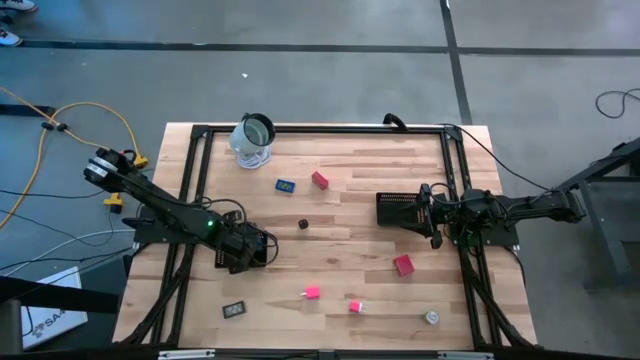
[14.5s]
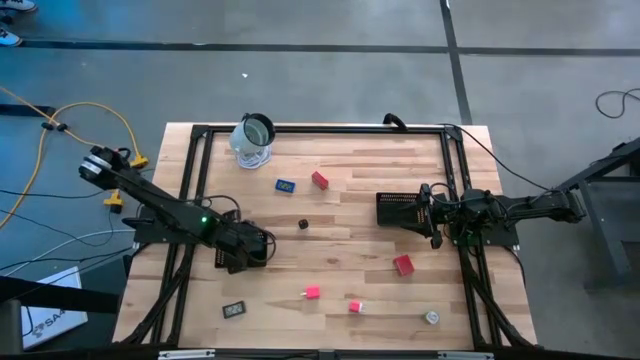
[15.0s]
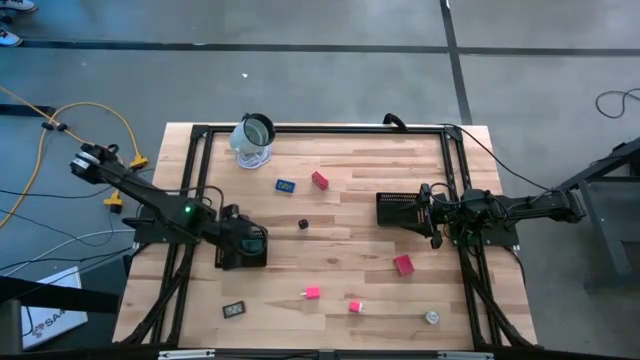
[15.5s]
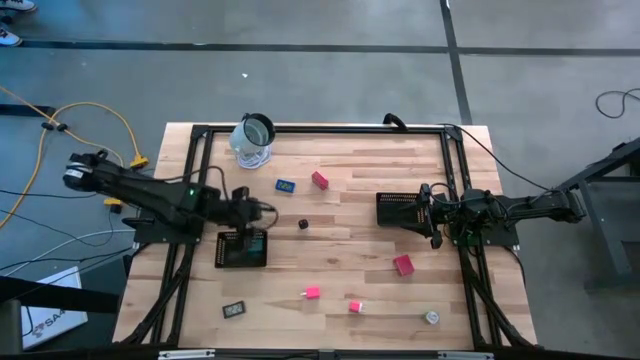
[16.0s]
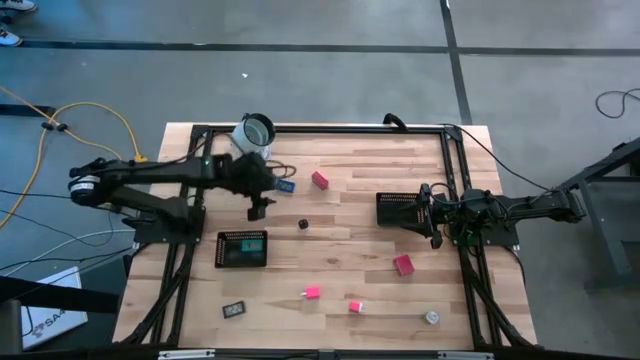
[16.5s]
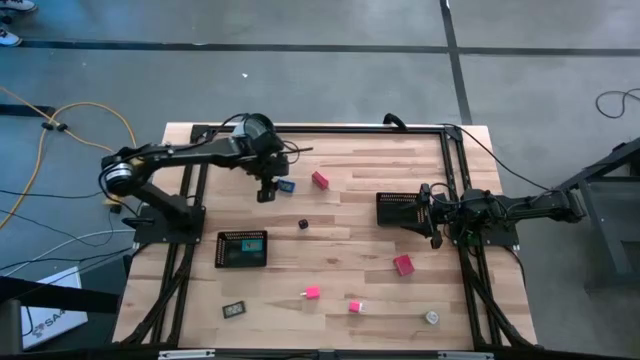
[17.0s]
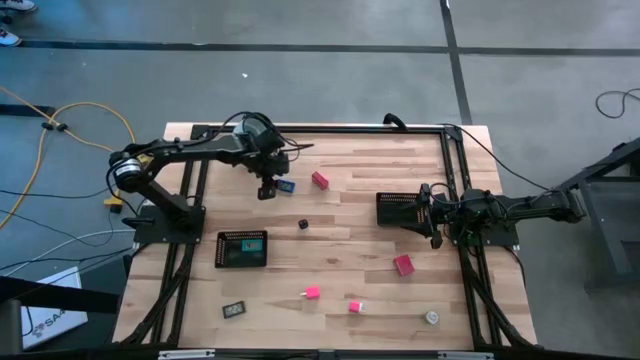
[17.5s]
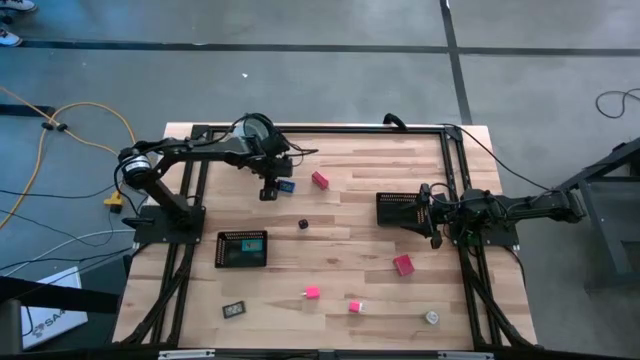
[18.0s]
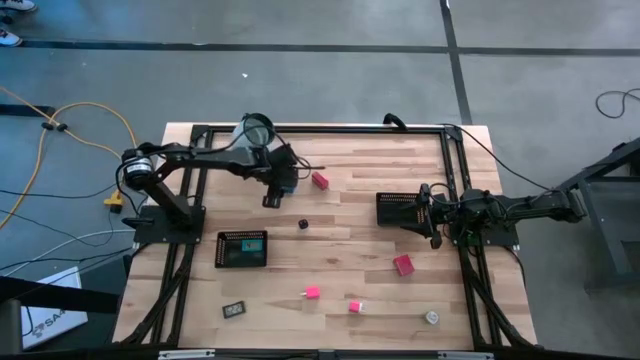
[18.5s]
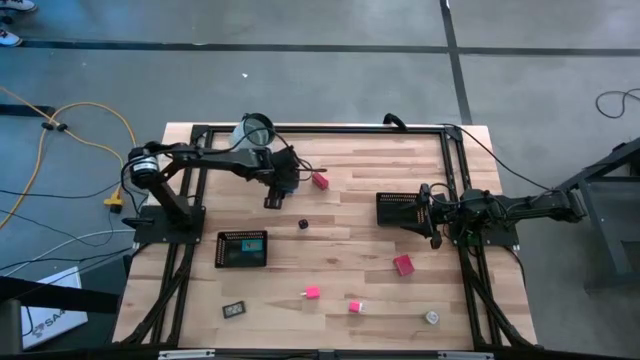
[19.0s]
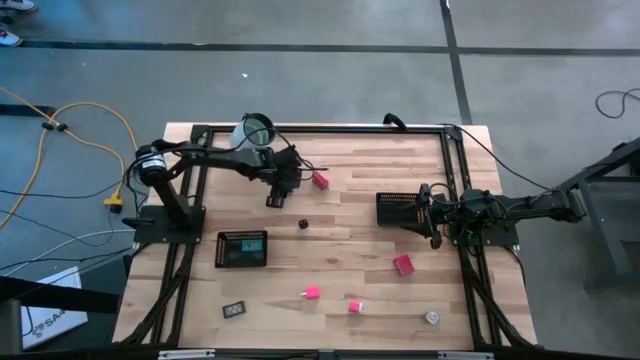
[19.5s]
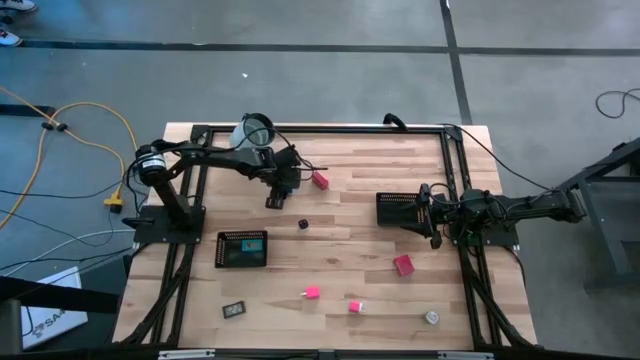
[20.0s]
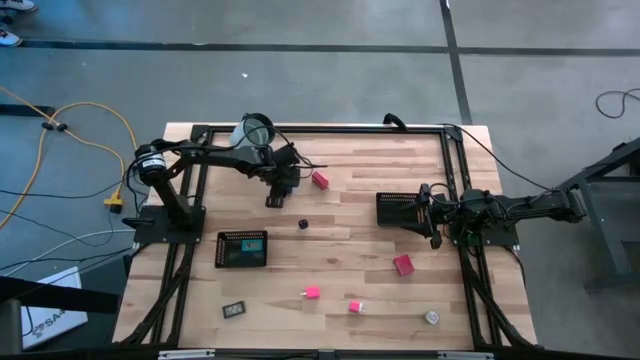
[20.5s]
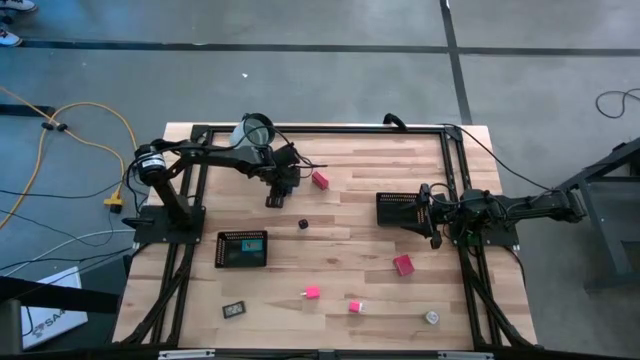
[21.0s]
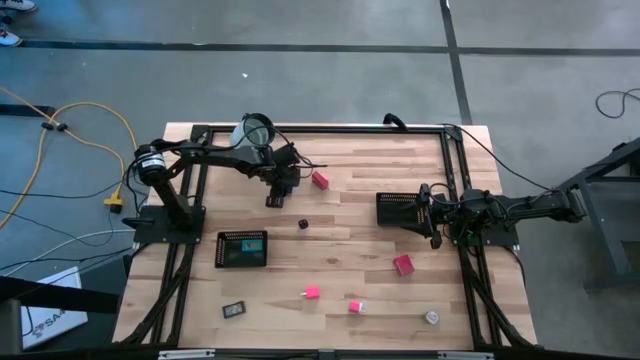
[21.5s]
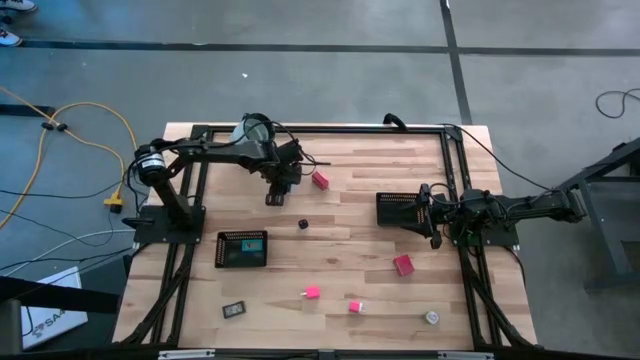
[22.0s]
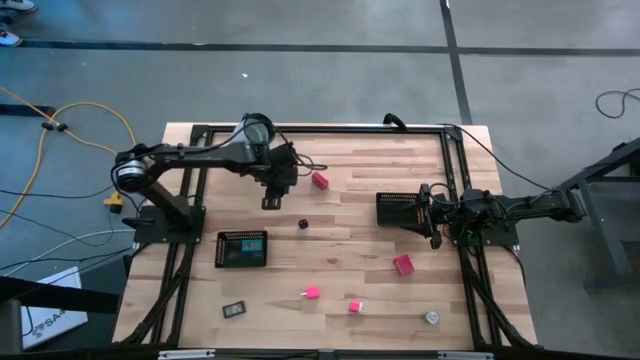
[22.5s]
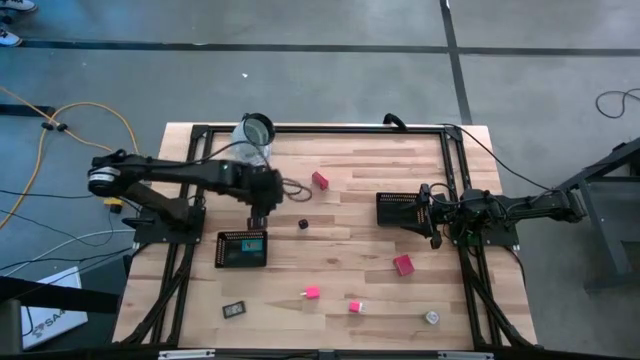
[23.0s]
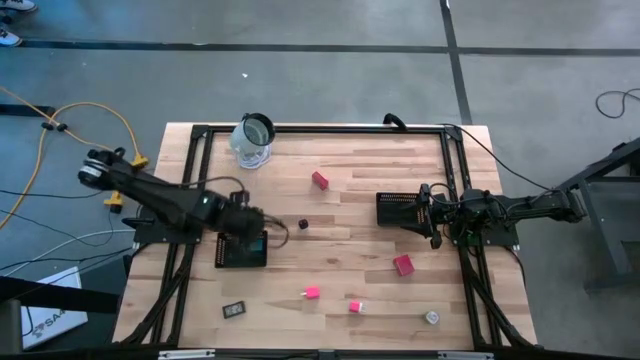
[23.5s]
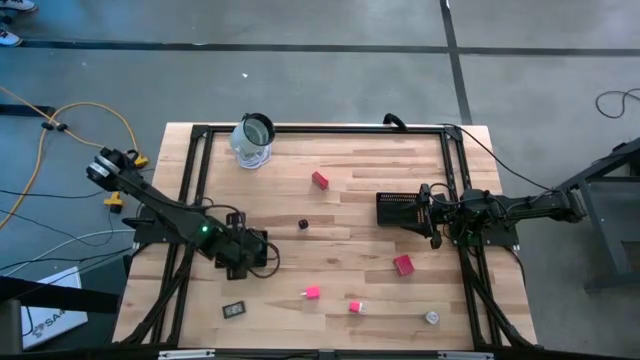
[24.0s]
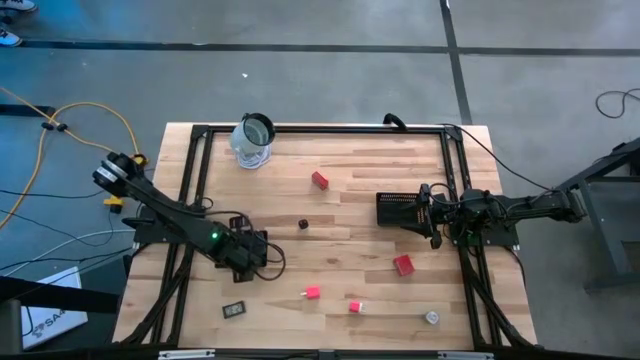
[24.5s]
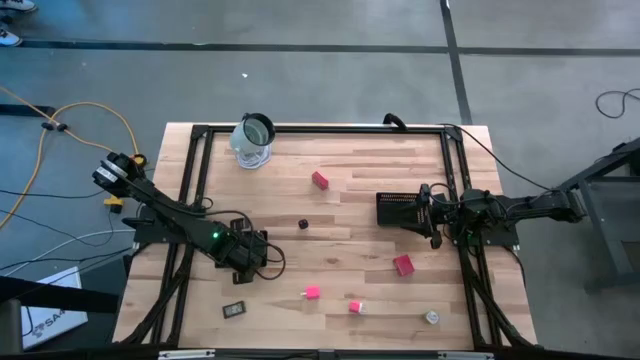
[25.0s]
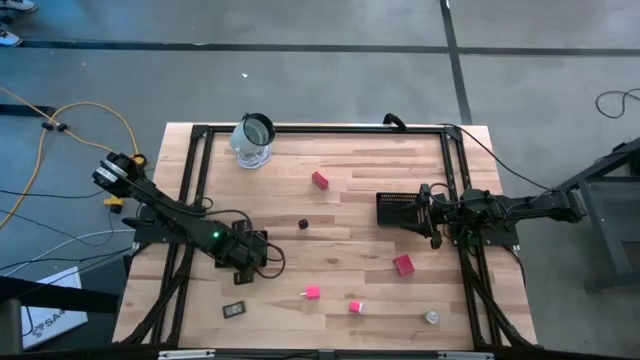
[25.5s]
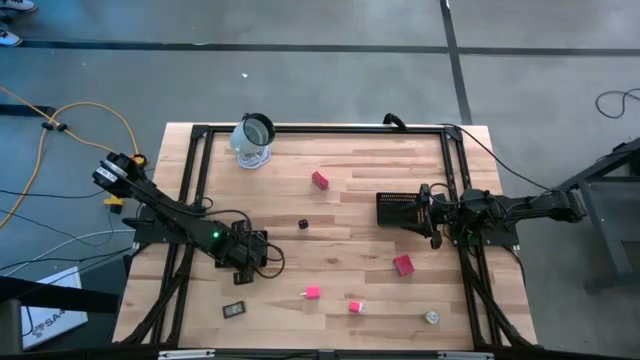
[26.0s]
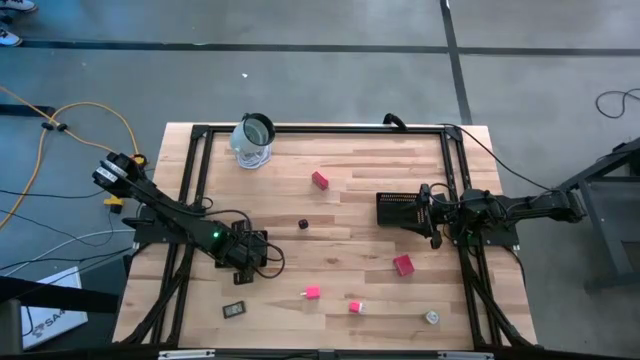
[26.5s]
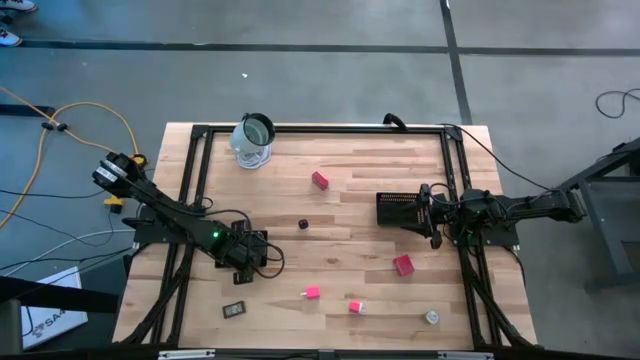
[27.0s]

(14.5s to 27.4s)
Task: Pick & Place Office items
Put the dark blue digital timer into the left black bin

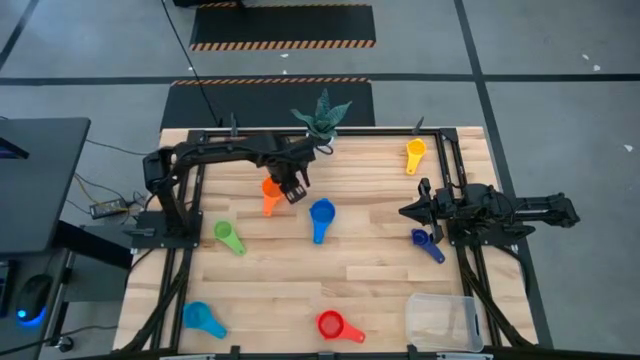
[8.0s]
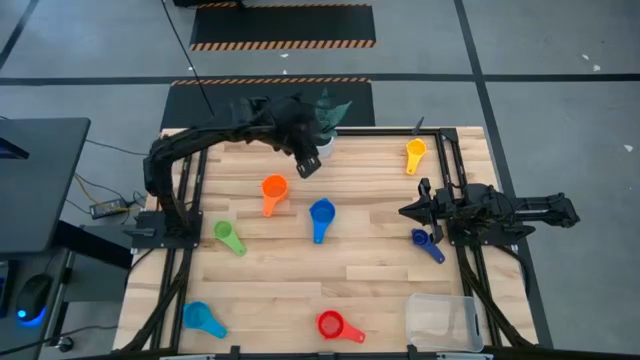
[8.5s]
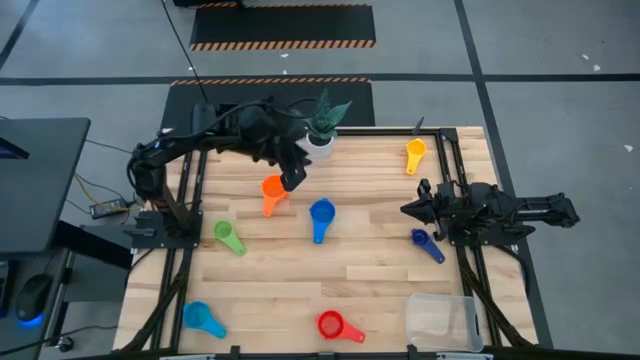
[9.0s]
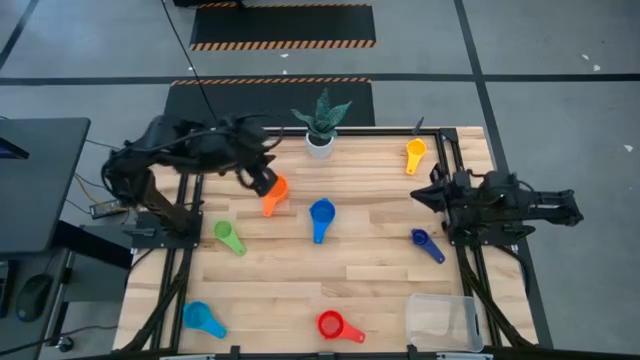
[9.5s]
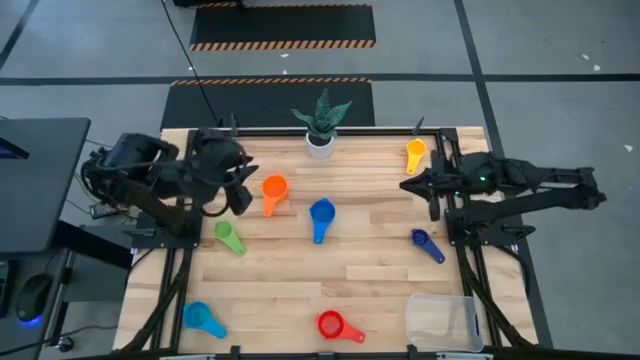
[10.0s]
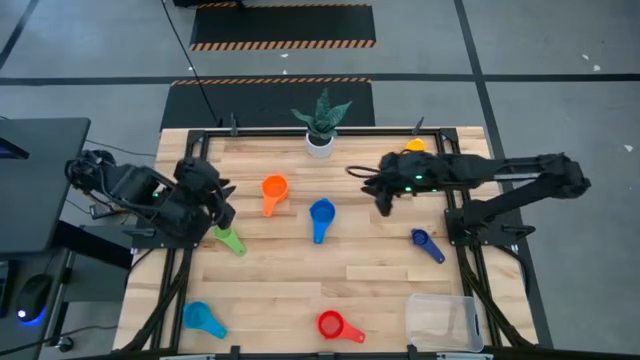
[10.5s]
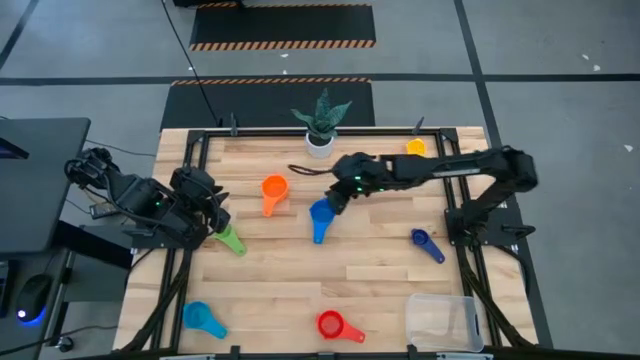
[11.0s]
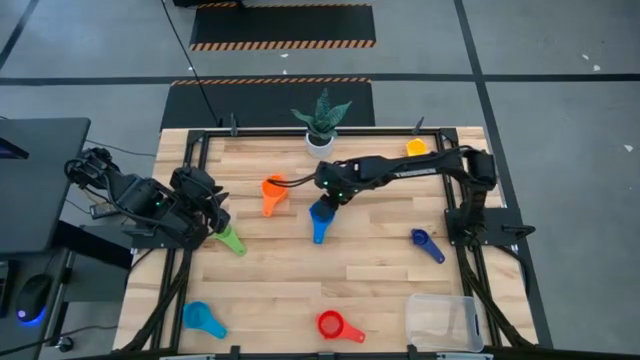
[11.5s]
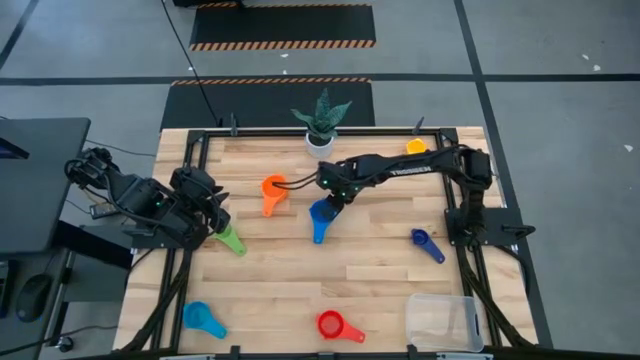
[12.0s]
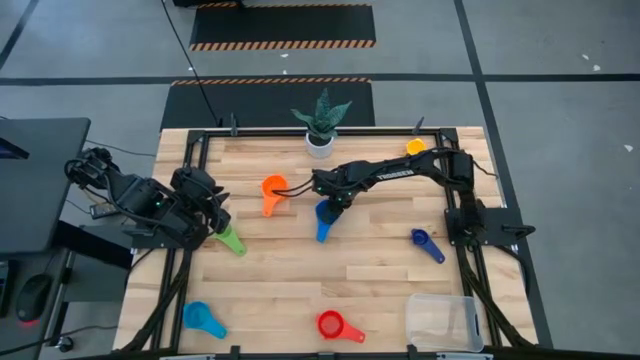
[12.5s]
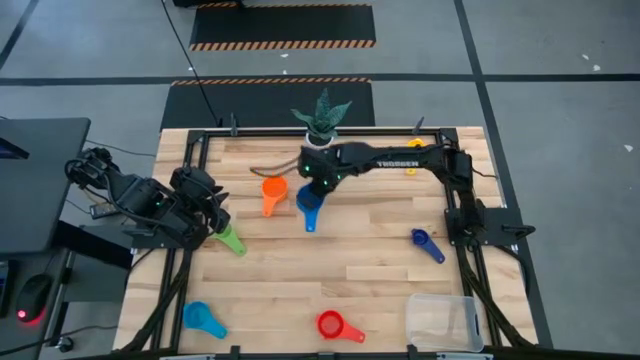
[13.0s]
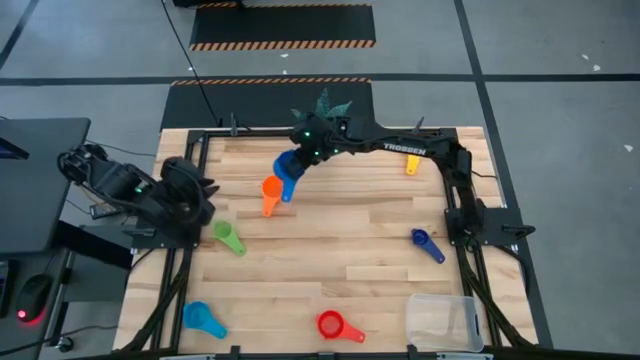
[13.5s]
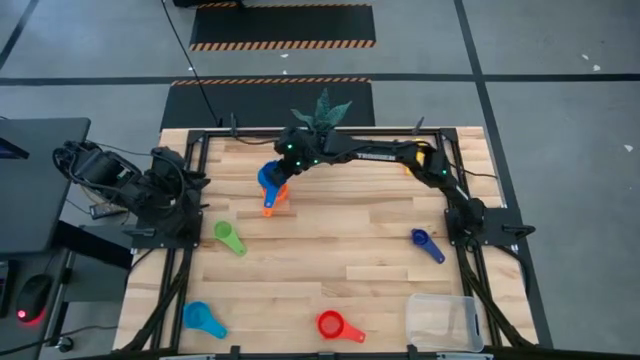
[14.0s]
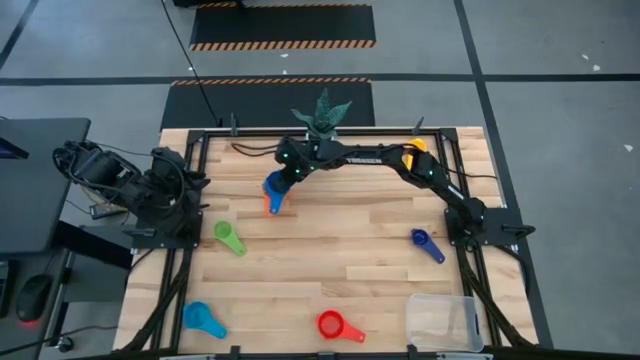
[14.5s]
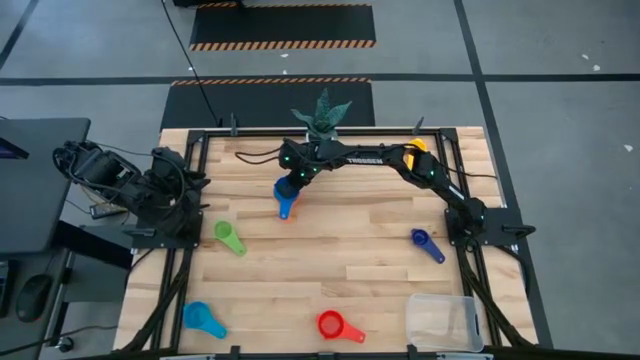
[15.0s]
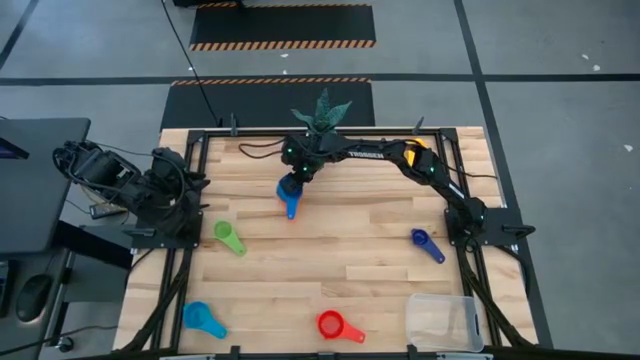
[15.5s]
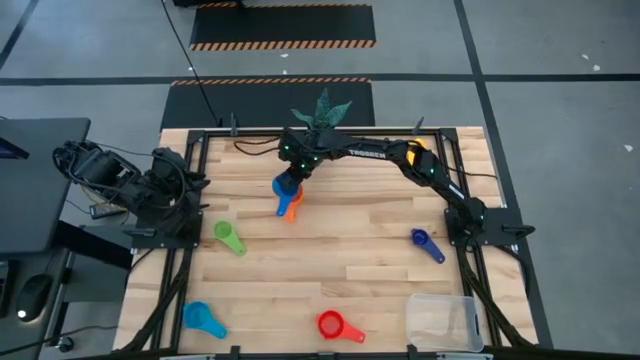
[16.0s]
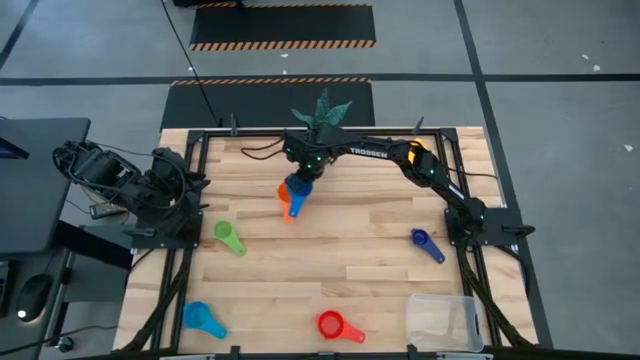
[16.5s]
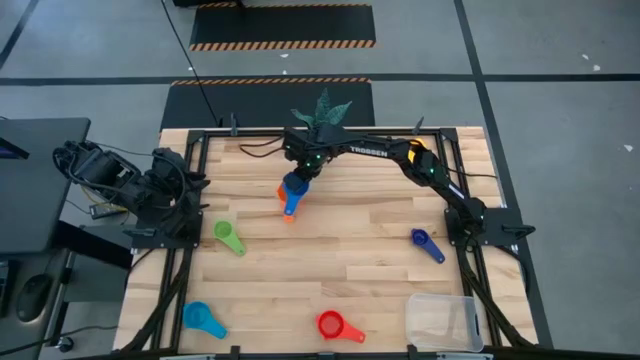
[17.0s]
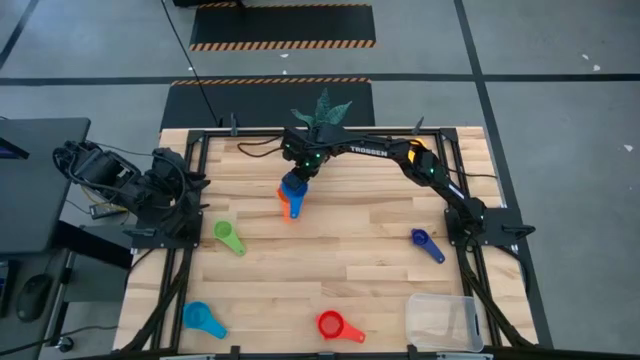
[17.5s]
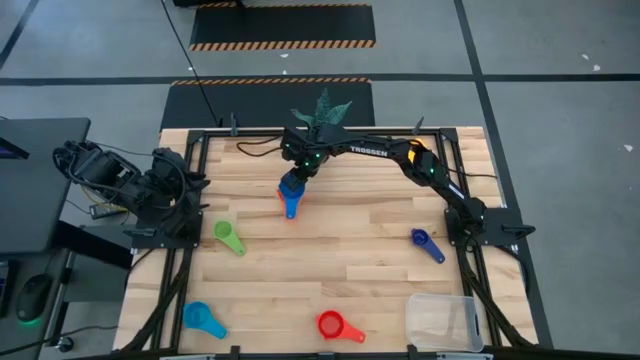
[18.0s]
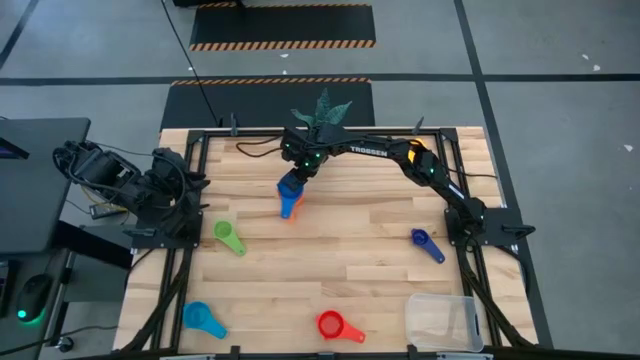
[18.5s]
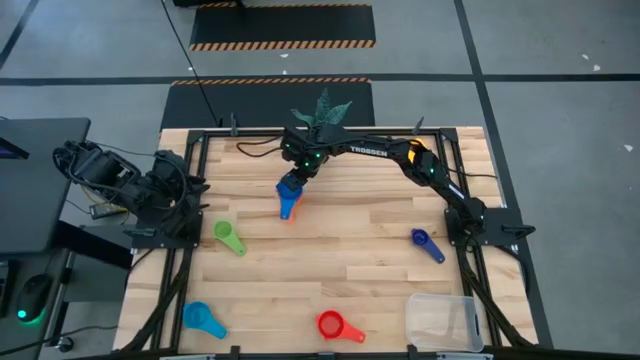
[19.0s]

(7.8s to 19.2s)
Task: Nest measuring cups in basket
Stack the top light blue measuring cup on top of the orange measuring cup
